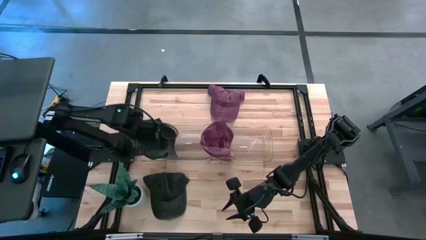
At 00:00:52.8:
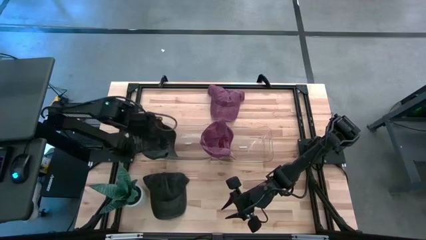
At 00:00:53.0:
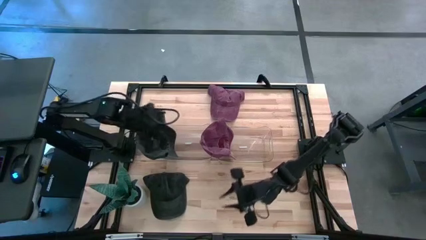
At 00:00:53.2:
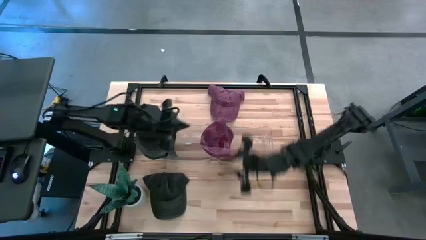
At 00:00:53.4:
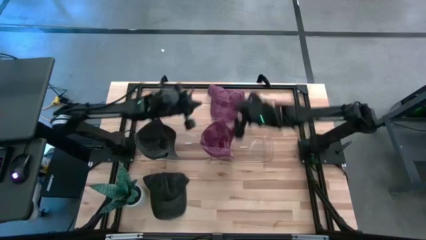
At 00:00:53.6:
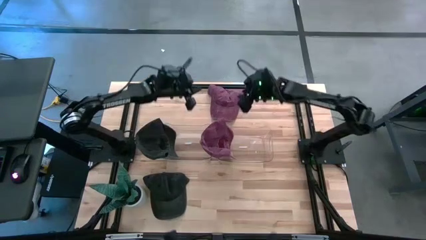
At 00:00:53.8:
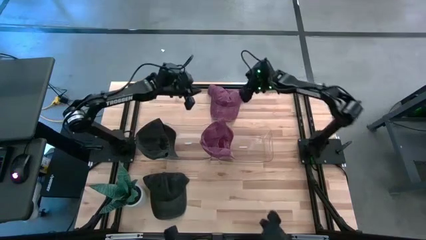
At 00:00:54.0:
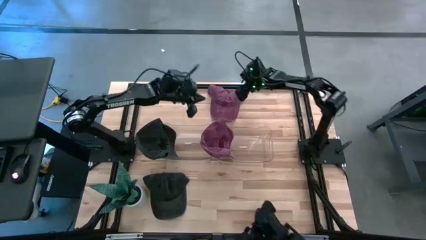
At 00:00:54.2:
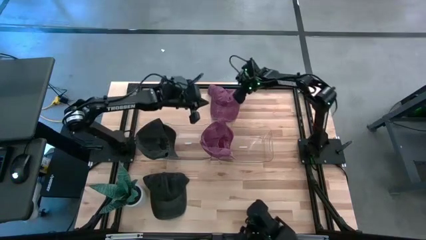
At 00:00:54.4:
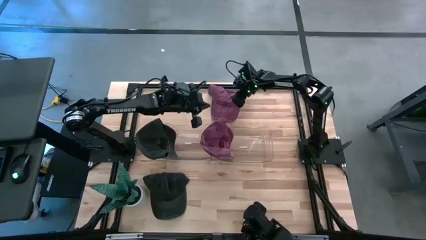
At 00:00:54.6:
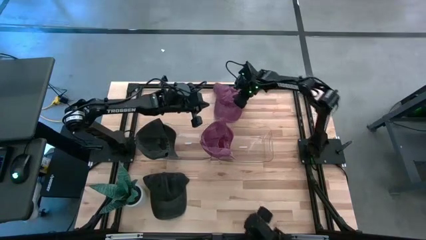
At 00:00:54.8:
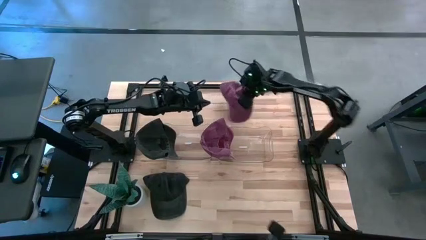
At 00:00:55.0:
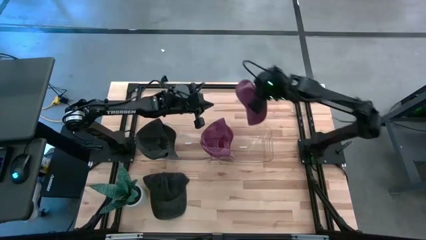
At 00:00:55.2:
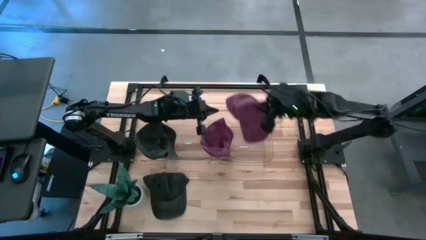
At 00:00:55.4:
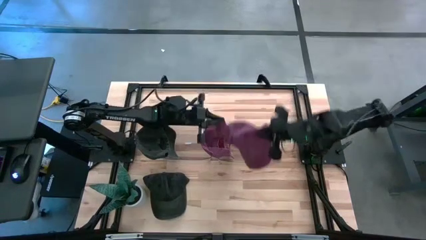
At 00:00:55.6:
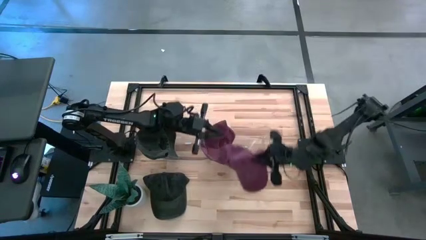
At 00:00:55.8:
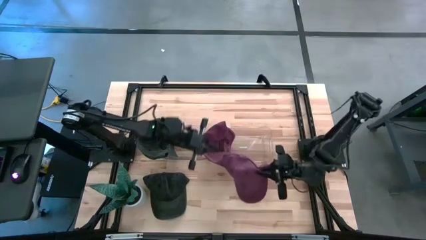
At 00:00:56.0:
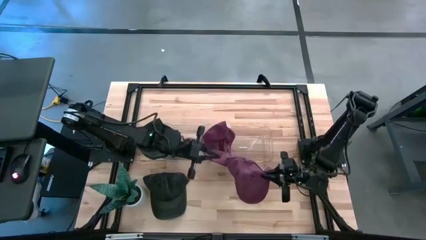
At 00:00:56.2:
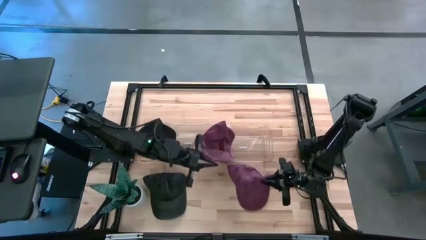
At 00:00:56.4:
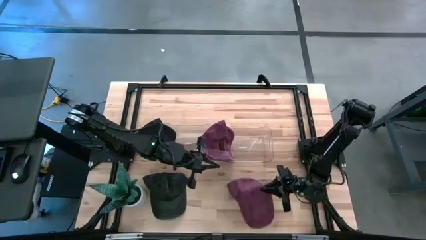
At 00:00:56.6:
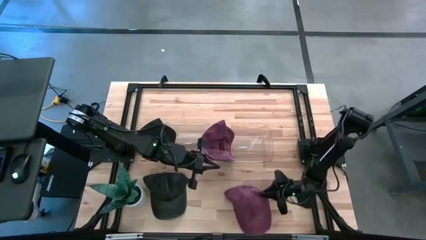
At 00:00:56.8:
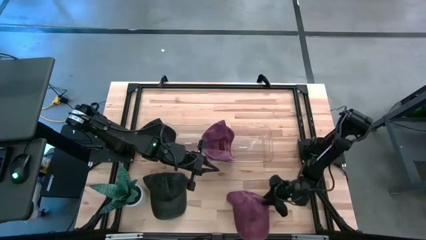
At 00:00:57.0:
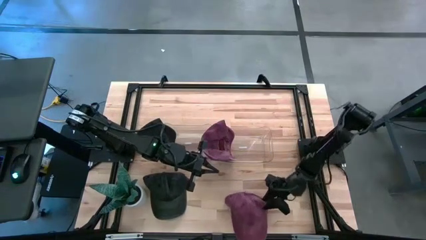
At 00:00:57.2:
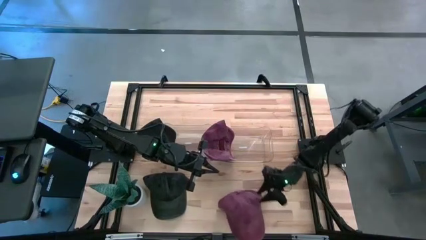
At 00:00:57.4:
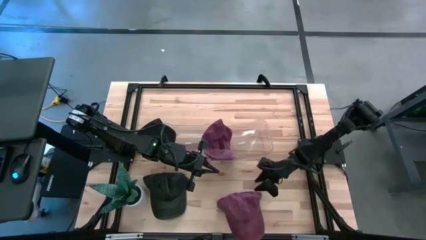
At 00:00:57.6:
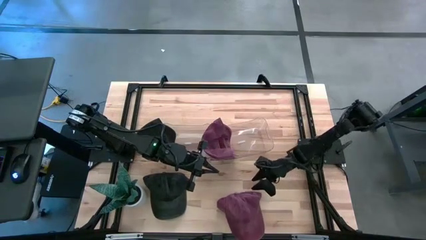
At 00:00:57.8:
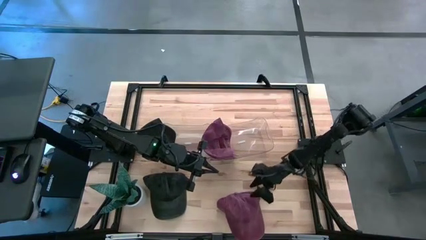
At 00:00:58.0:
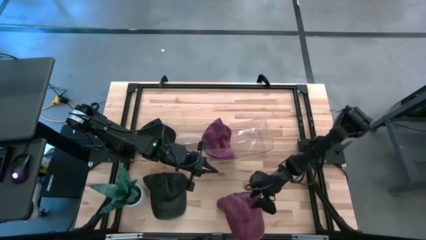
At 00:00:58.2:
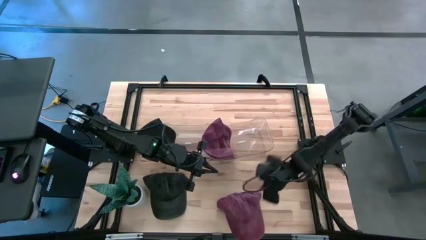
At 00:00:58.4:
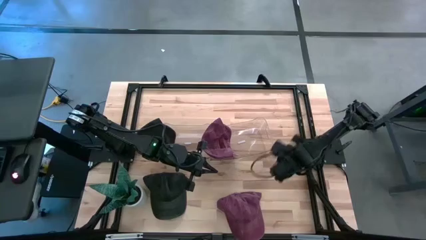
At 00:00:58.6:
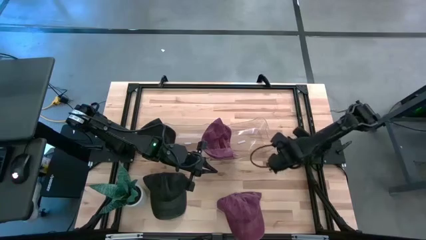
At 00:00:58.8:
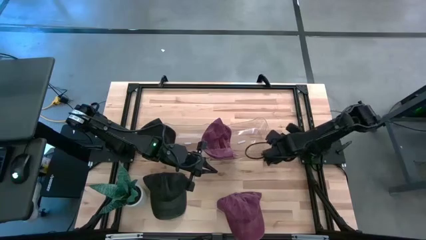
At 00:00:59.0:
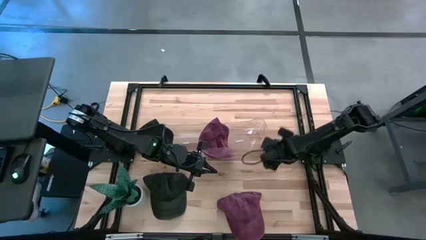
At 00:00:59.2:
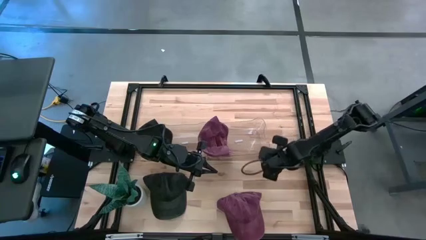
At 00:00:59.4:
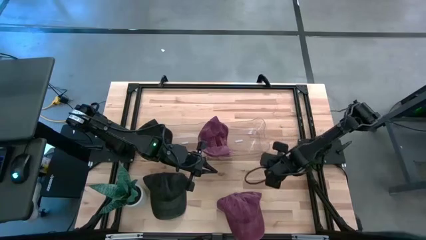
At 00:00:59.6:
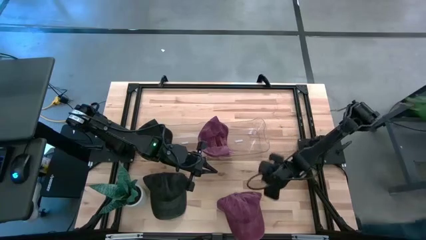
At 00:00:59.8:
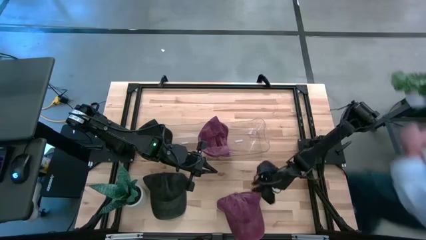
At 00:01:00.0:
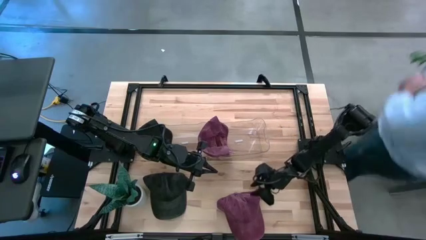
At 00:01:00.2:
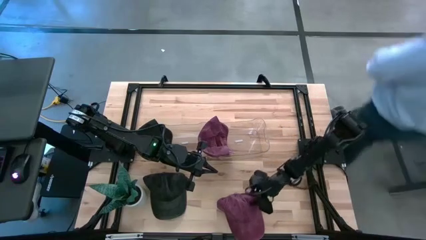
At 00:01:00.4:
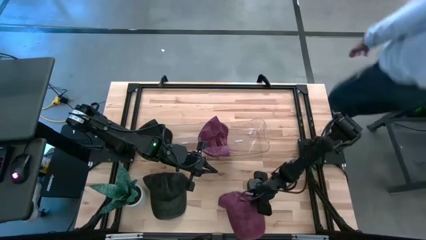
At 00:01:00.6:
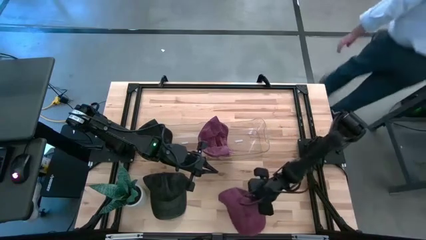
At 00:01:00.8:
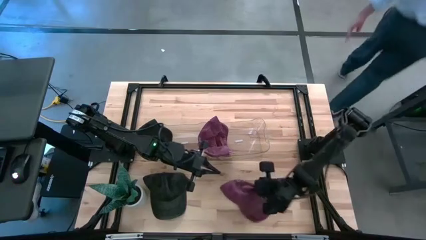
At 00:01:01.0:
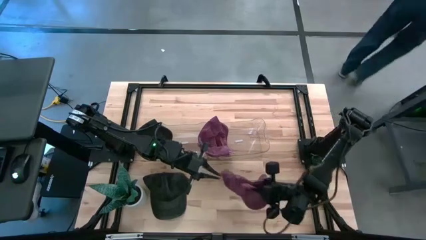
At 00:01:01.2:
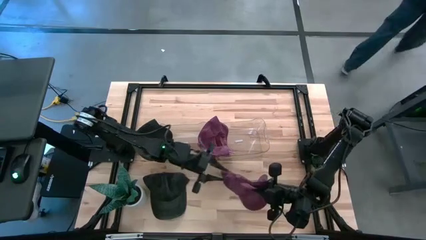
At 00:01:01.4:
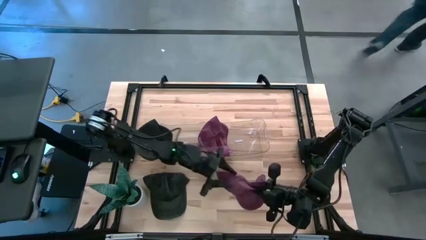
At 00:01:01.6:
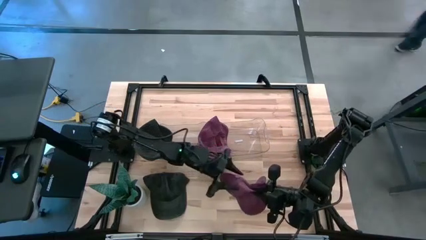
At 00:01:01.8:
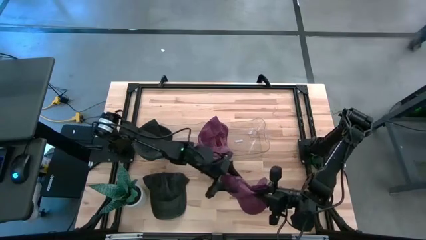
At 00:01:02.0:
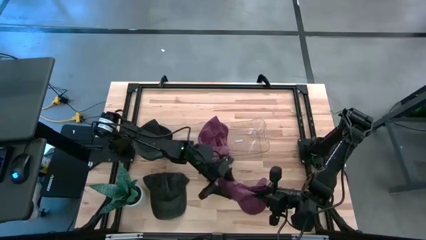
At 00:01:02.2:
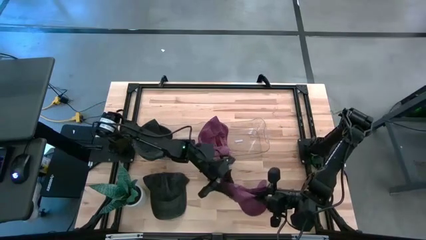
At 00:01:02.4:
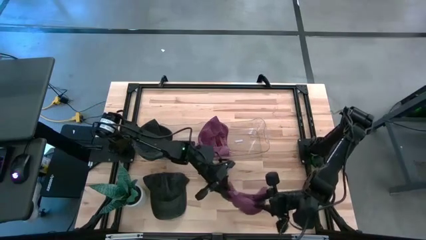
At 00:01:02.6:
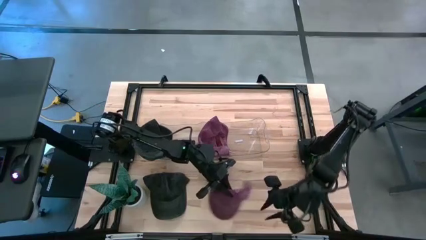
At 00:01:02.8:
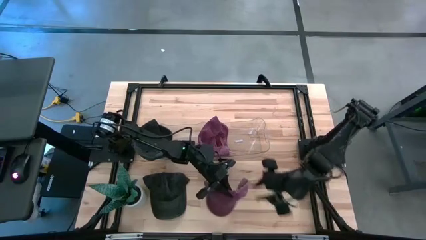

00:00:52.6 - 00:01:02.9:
Task: Pick & Place hat
Put the red cap into the right transparent bin
